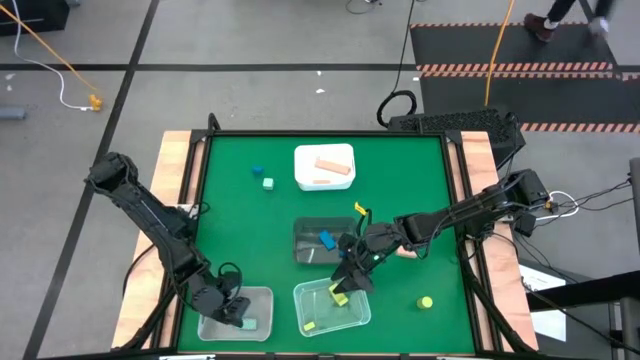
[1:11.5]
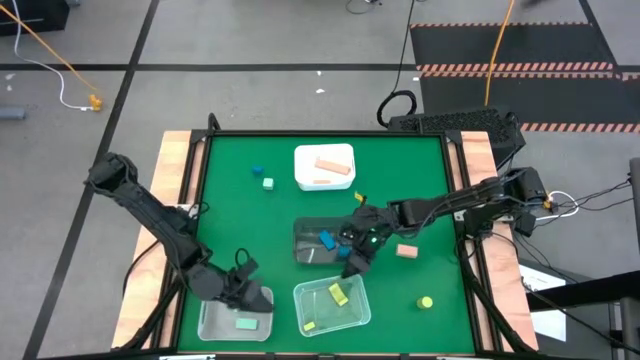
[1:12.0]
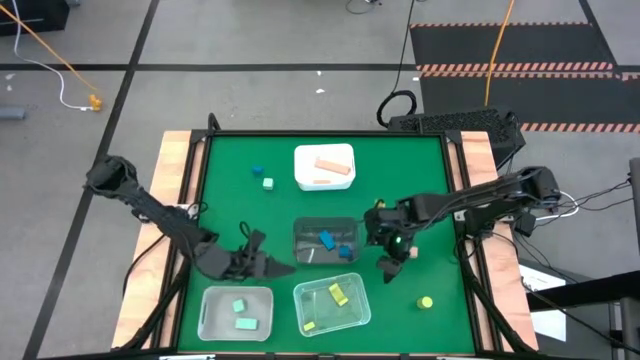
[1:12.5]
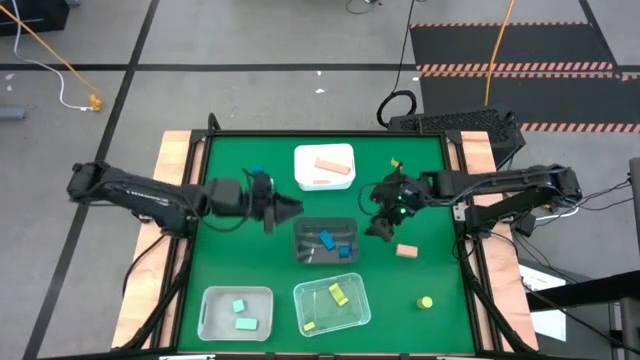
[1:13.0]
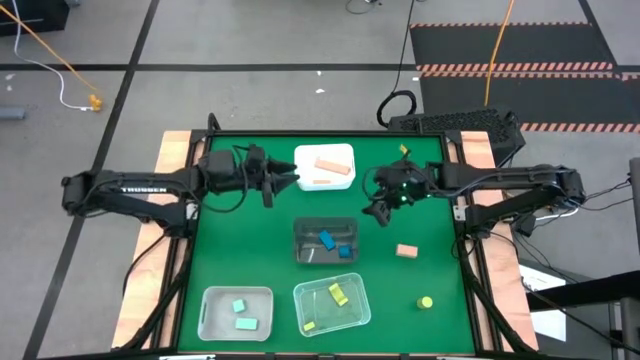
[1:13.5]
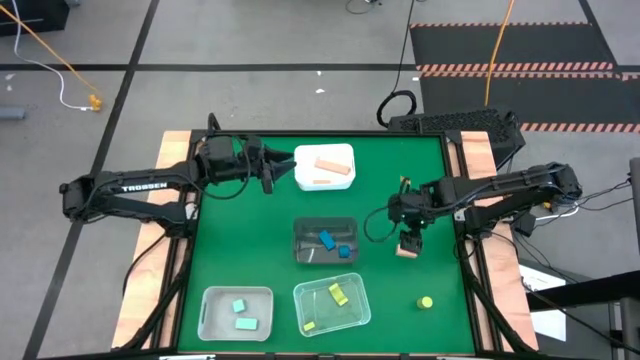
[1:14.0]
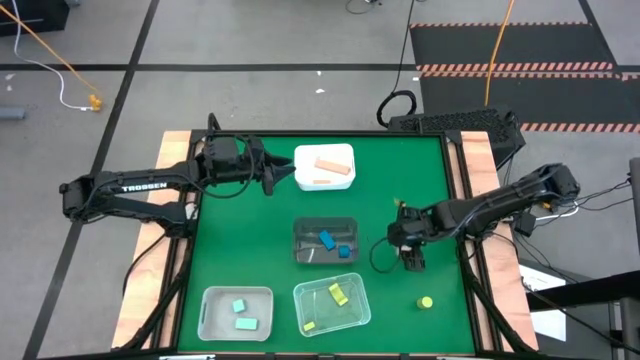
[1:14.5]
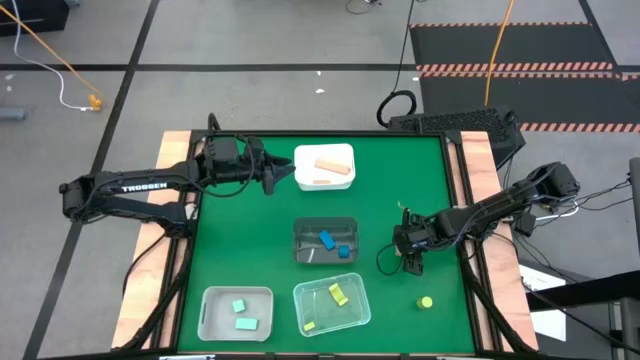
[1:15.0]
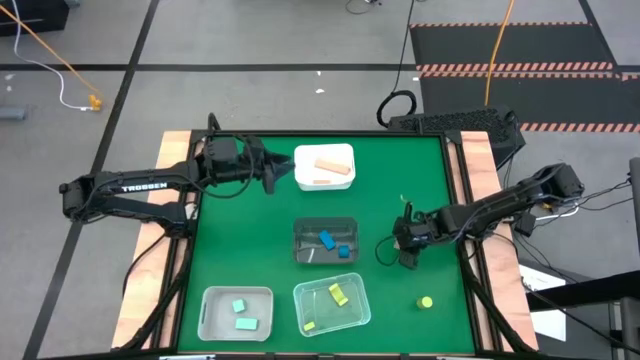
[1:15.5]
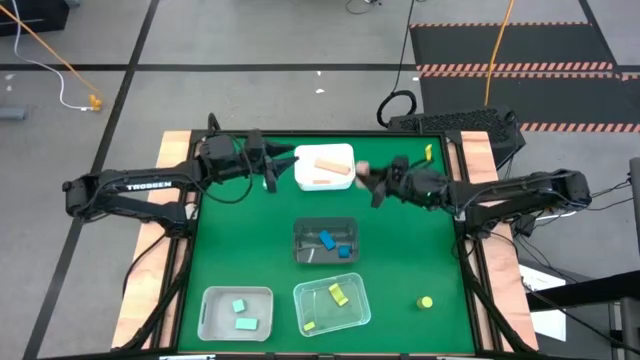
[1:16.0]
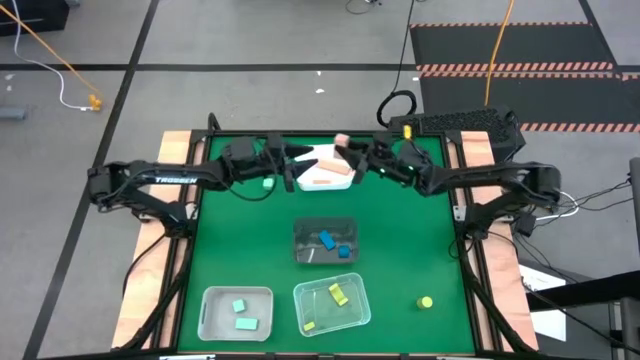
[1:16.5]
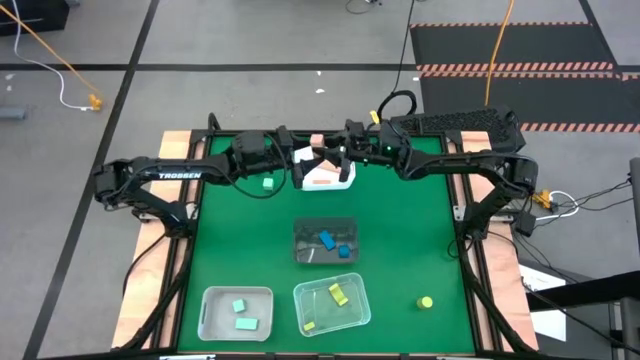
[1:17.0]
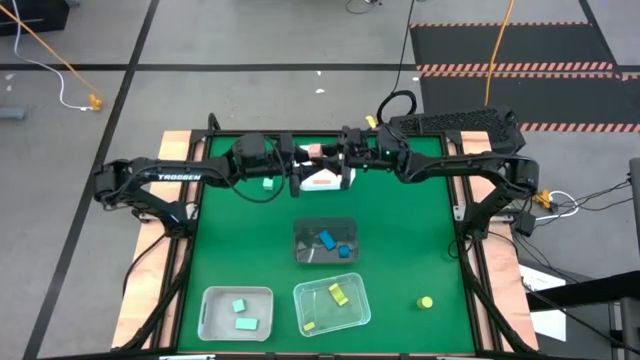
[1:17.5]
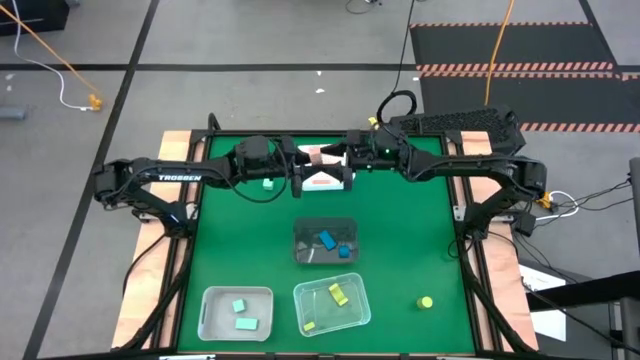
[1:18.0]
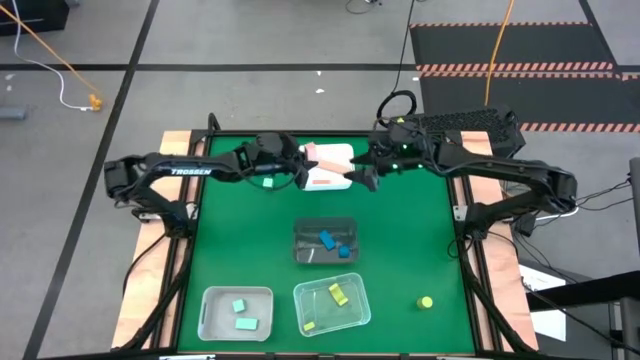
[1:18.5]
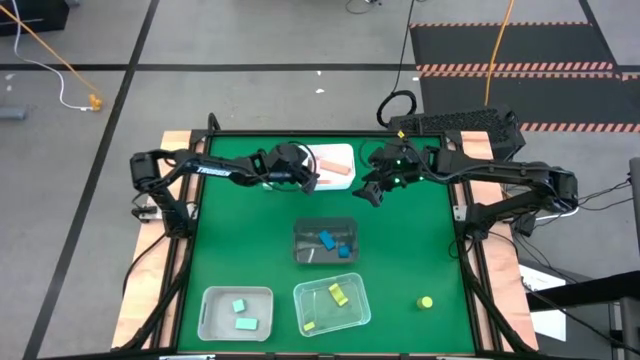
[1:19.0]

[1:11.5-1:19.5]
Task: Sort & place blocks by color
Put the brown block into the white bin

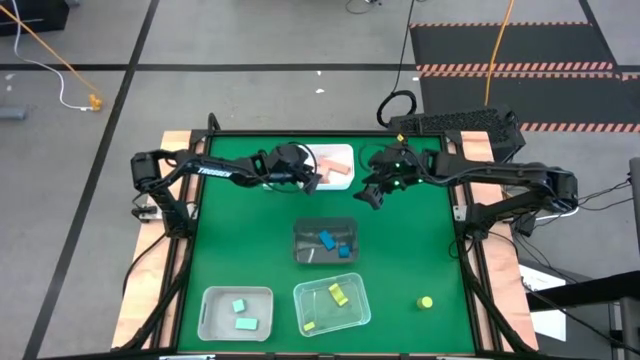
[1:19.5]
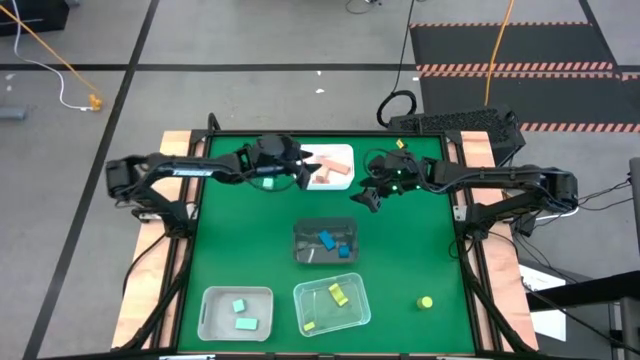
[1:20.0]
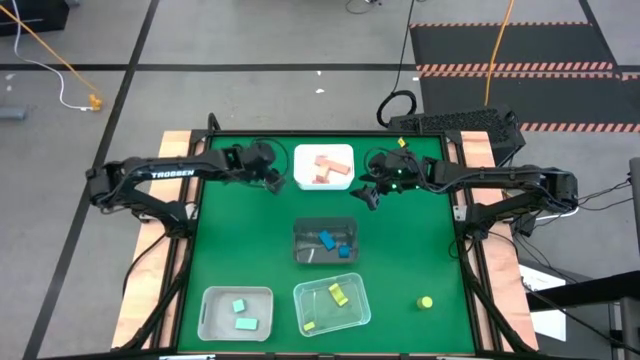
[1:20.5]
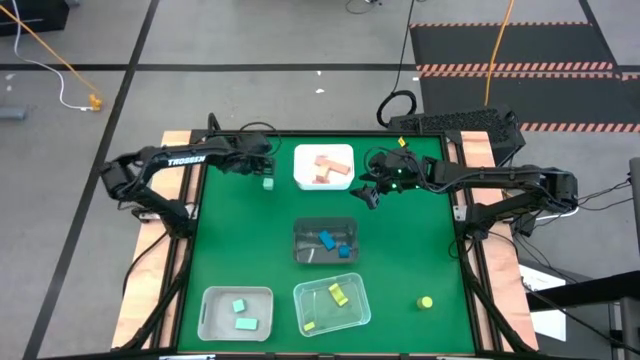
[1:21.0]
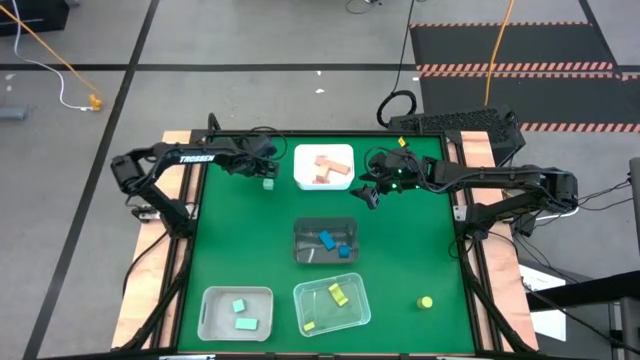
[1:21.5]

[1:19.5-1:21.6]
Put the blue block into the black bin

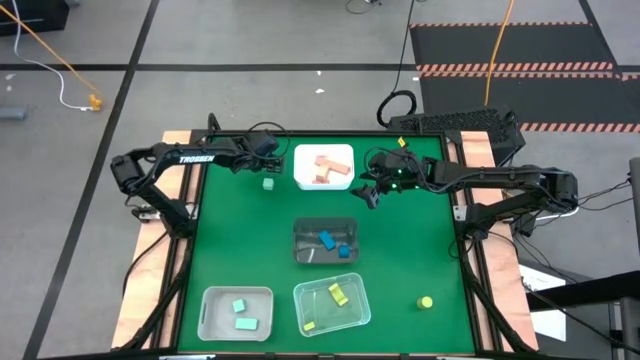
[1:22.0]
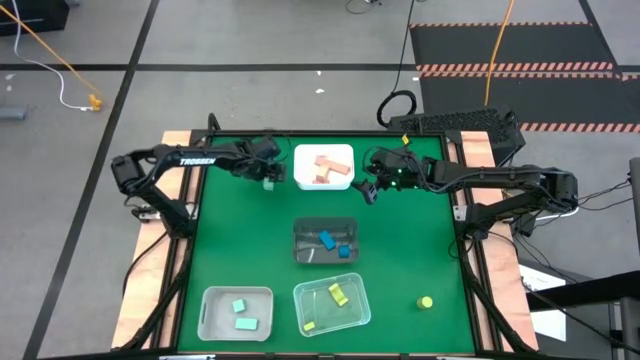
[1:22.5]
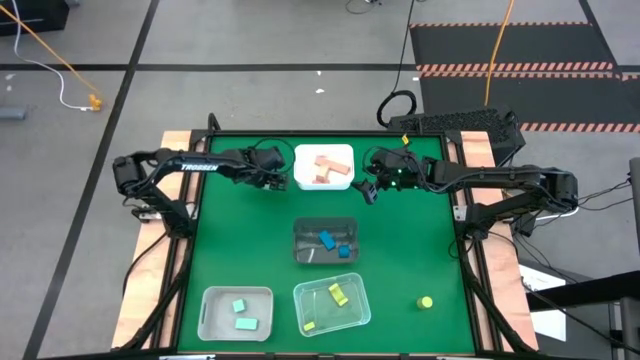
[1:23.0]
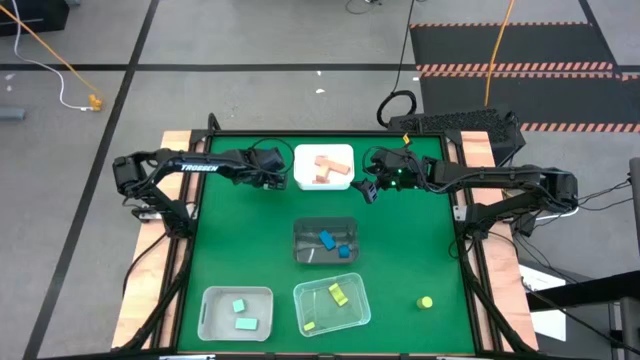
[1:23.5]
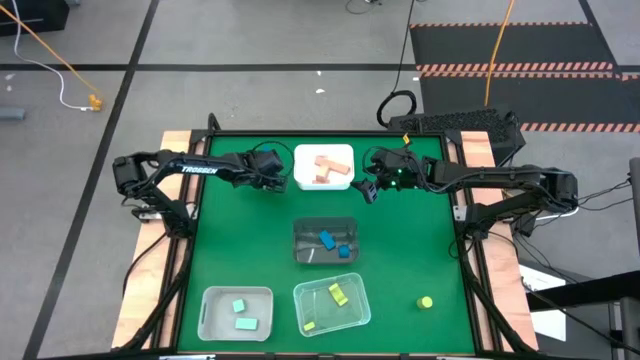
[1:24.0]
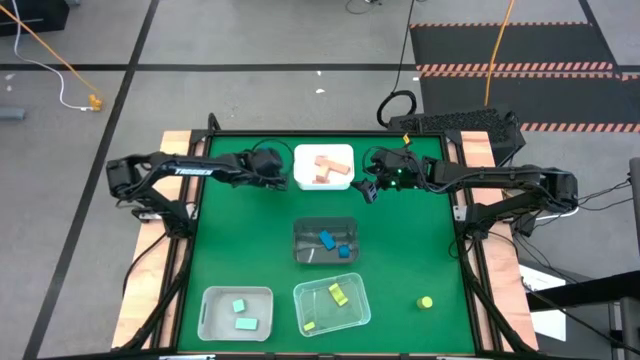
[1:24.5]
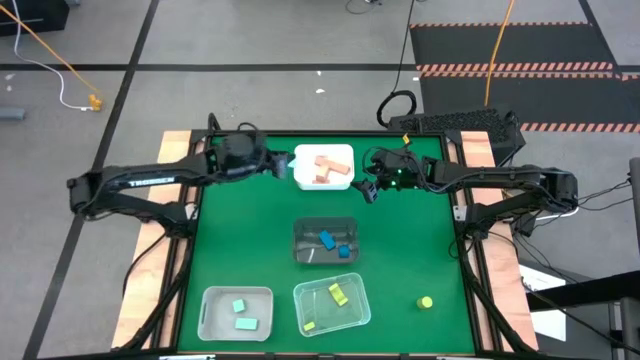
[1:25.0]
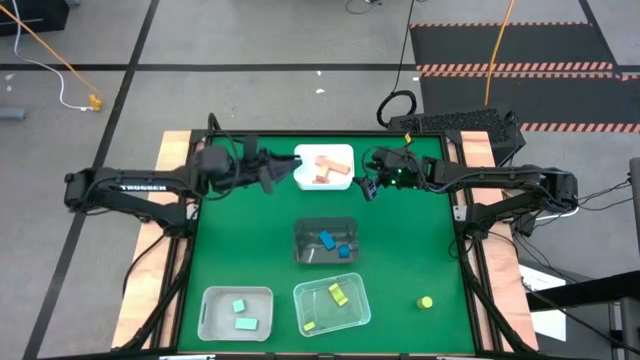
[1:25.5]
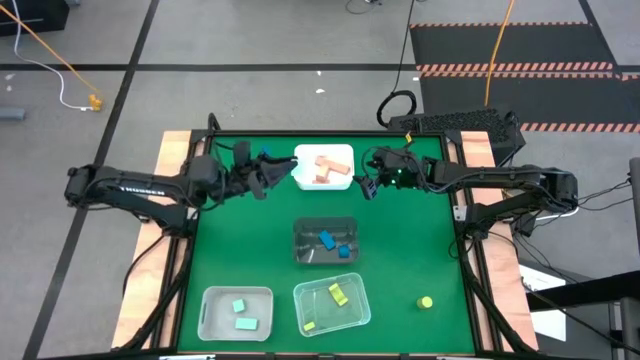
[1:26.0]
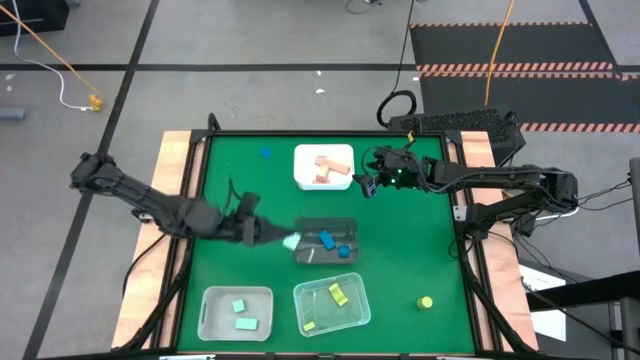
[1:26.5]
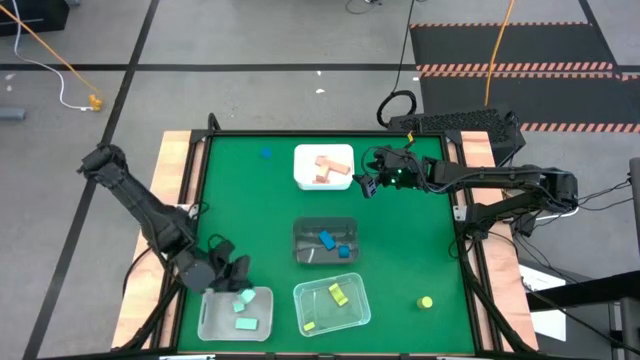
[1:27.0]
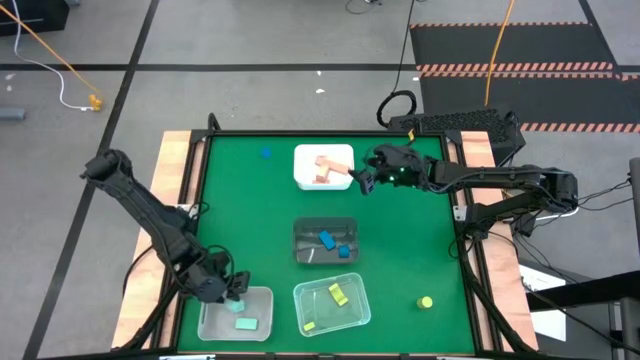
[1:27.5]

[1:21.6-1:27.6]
Put the light blue block into the gray bin

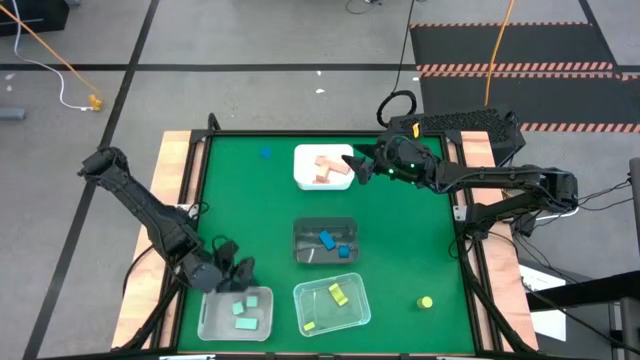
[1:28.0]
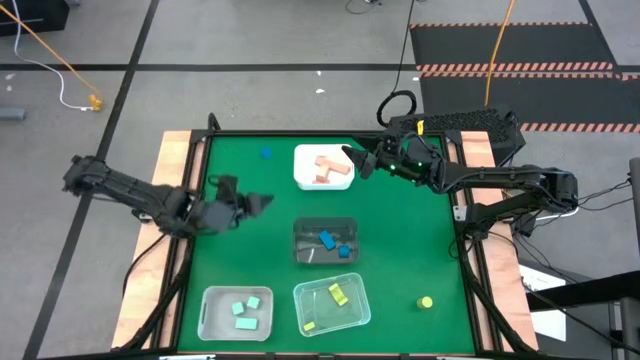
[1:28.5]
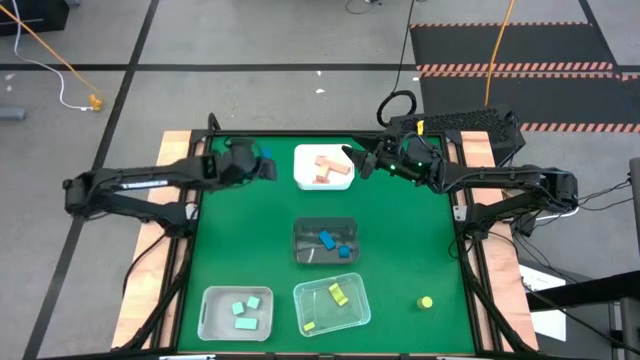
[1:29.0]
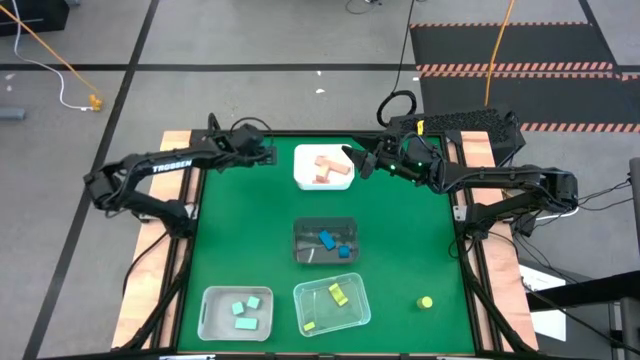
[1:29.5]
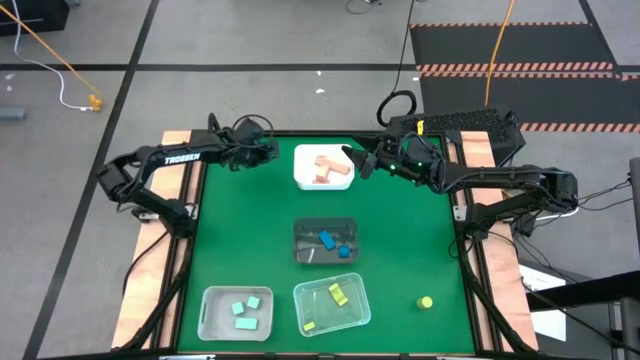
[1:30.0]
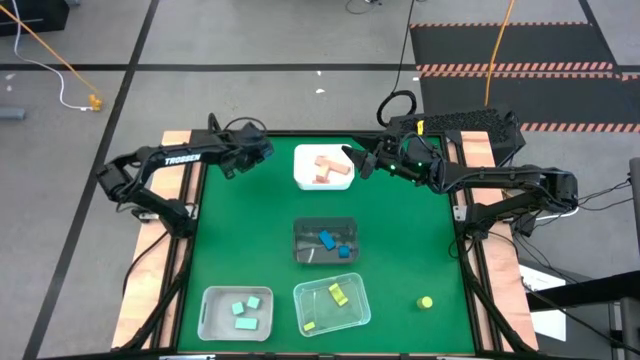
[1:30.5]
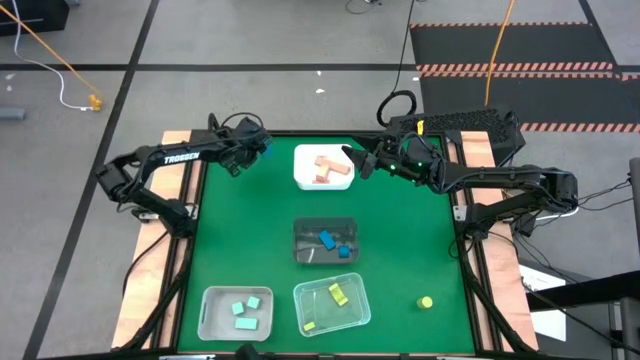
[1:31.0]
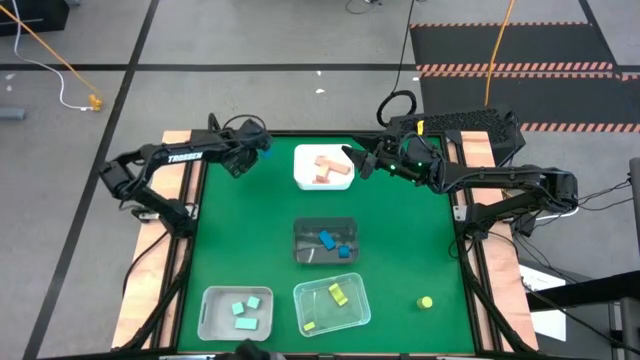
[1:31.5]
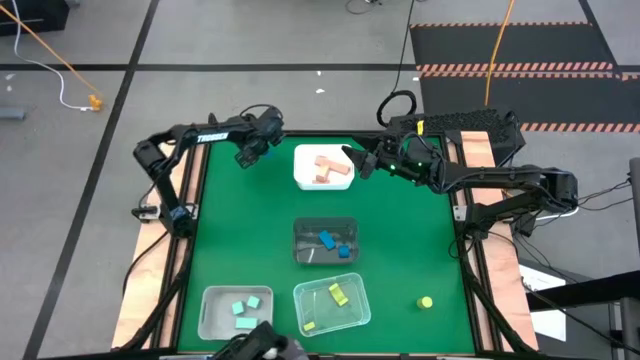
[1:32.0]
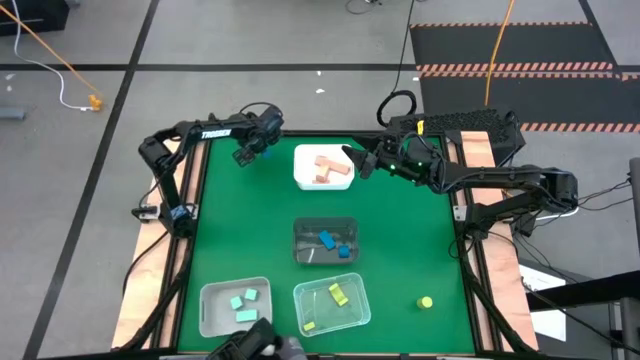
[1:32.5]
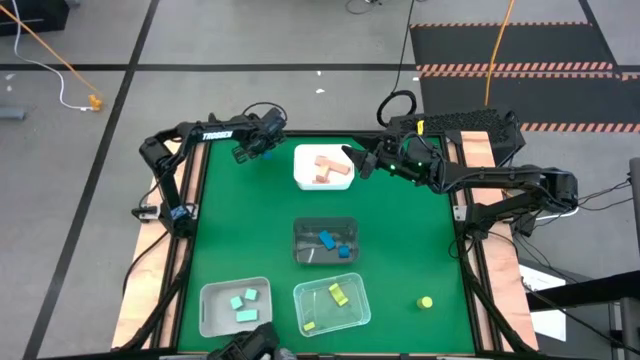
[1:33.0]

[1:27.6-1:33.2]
Put the blue block into the black bin
